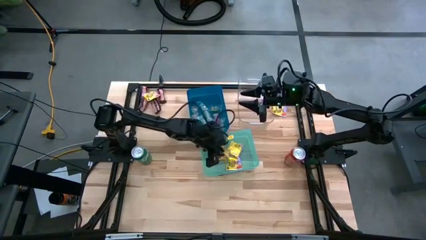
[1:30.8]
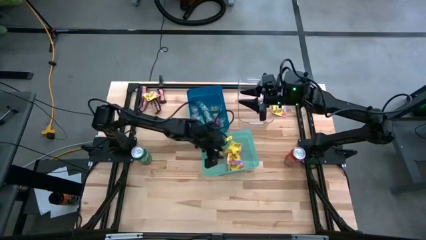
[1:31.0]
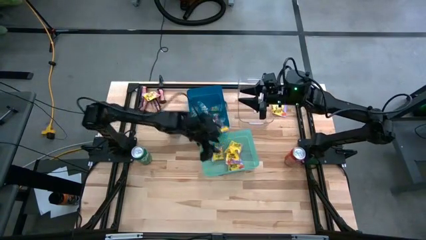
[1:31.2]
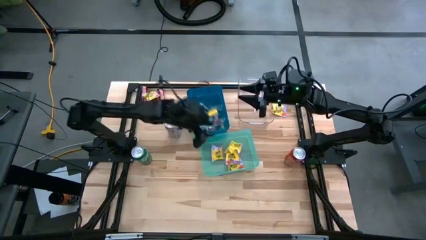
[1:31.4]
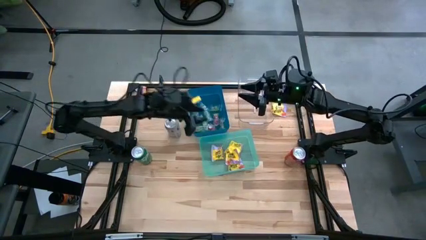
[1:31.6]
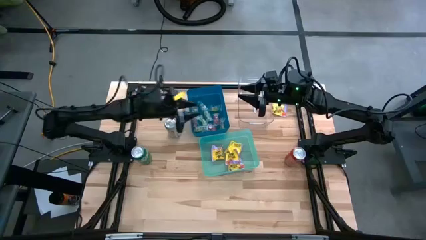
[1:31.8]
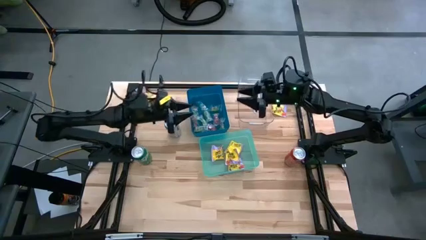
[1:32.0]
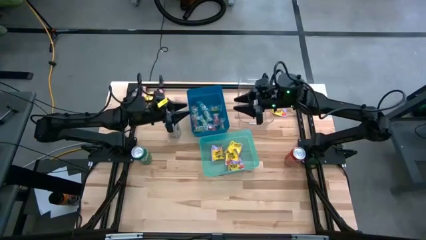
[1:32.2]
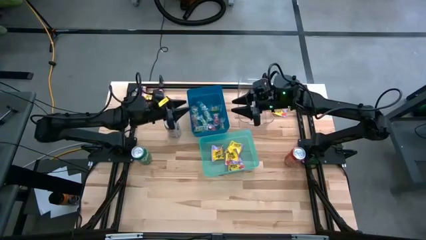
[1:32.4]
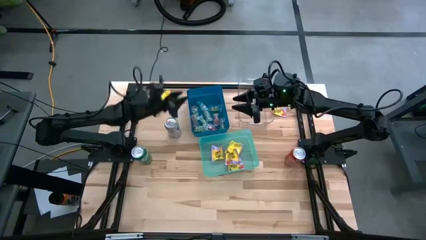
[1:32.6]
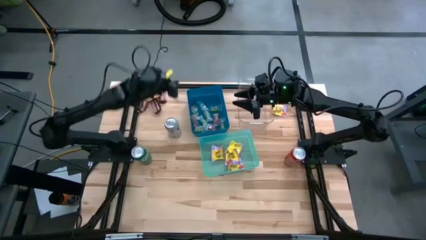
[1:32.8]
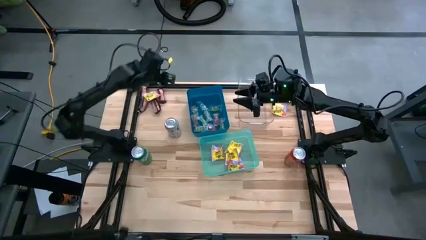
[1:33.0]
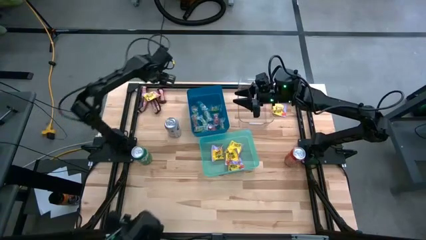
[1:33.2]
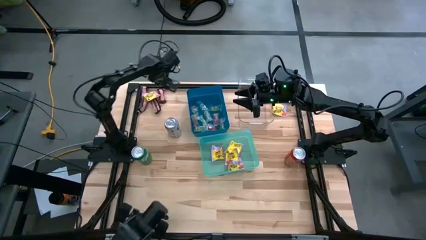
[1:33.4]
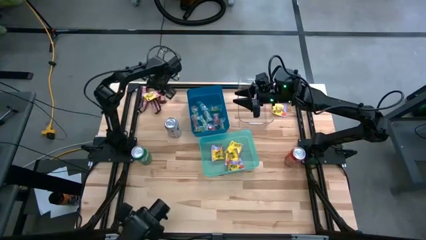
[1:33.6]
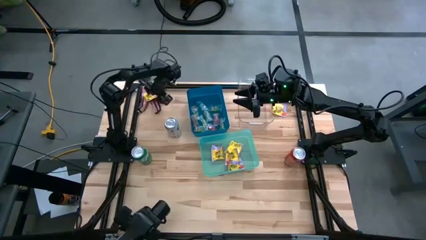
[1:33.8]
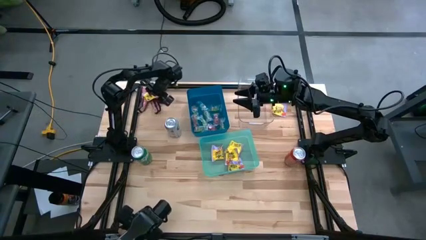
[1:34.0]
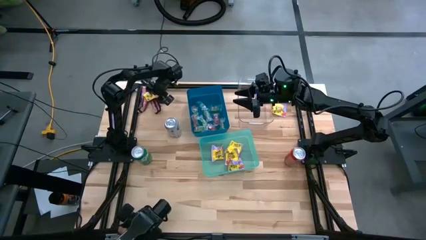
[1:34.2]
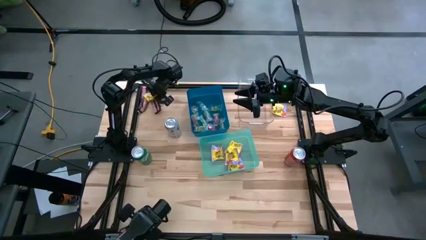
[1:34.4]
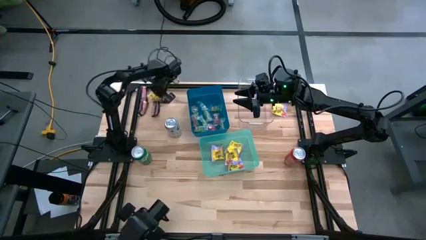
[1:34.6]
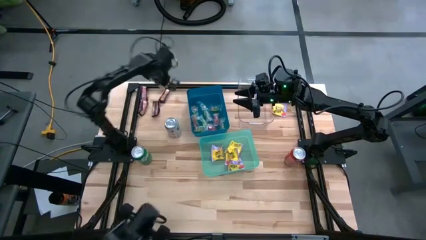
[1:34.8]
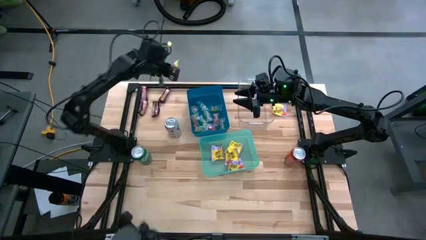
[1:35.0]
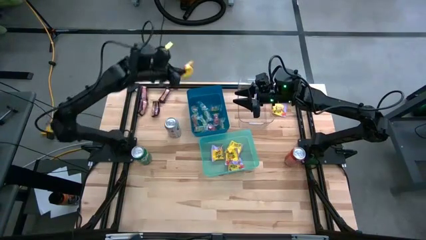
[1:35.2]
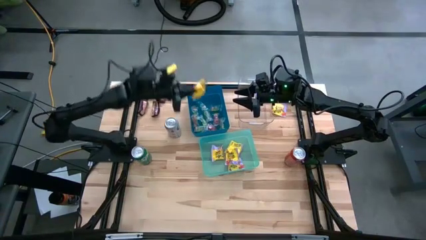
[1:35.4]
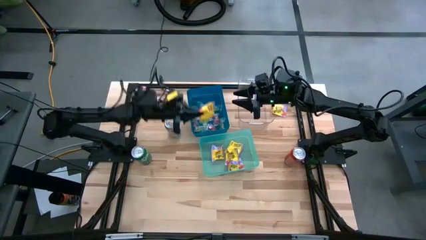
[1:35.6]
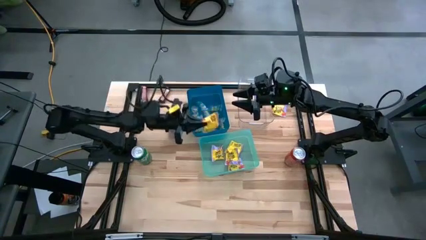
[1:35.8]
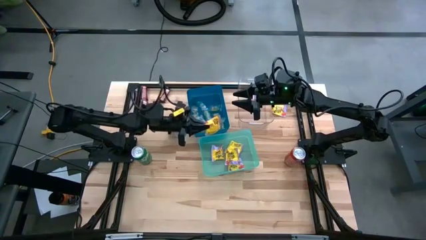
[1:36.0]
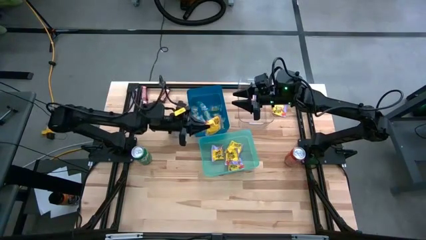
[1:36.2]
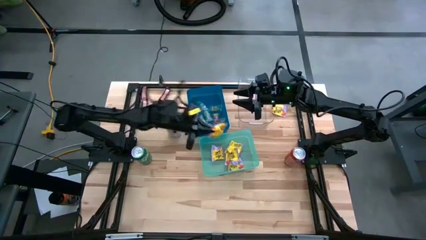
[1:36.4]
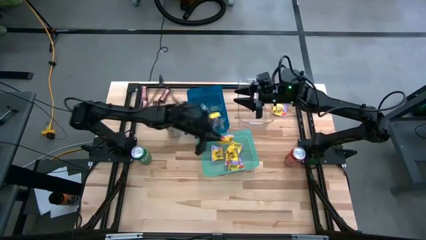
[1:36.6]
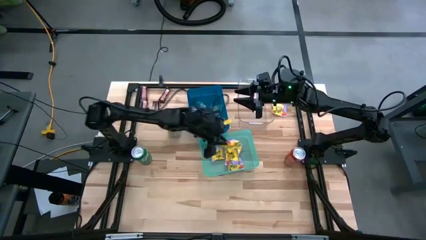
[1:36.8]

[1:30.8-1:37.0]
Task: Sort candy
Put the yellow candy into the green bin

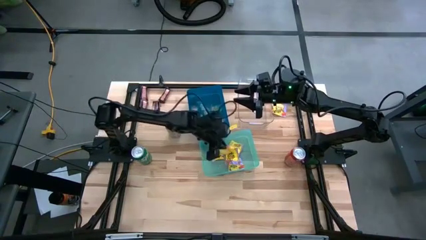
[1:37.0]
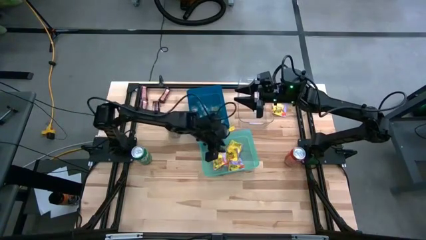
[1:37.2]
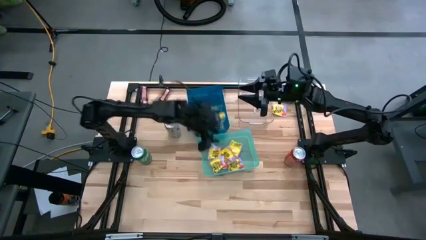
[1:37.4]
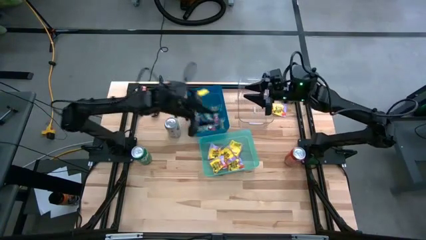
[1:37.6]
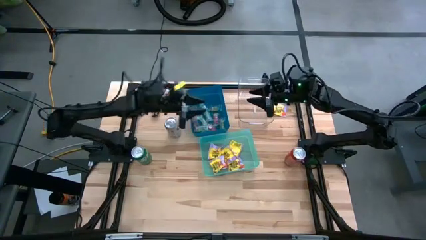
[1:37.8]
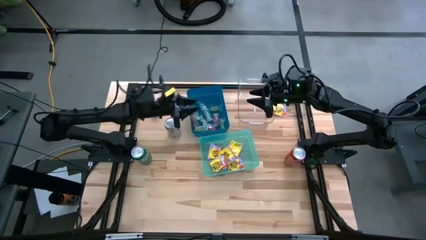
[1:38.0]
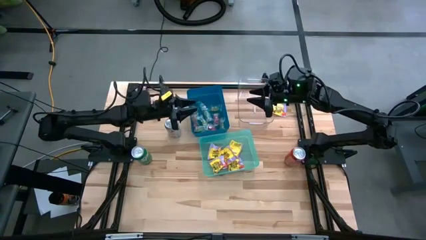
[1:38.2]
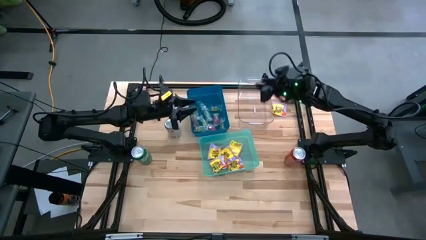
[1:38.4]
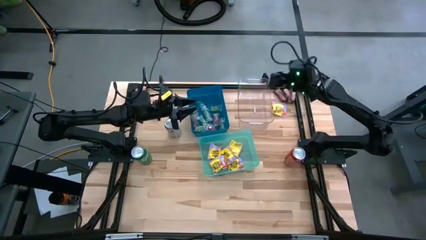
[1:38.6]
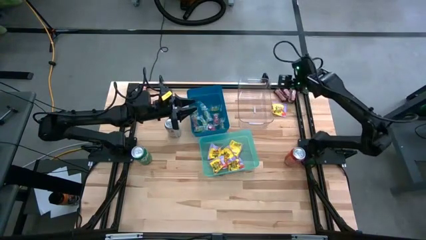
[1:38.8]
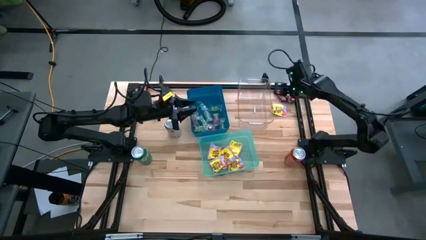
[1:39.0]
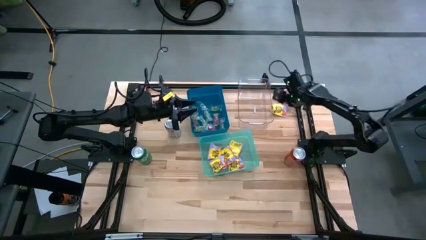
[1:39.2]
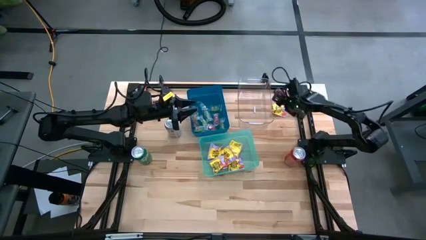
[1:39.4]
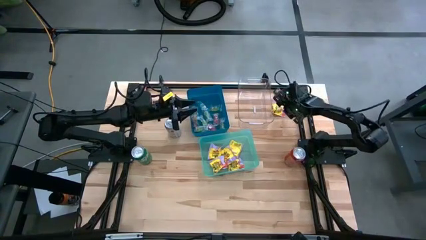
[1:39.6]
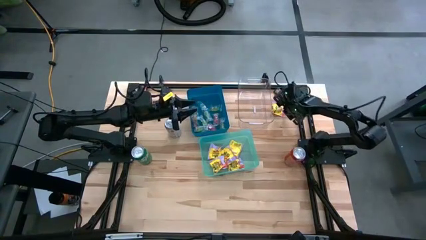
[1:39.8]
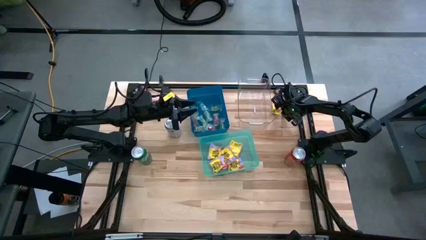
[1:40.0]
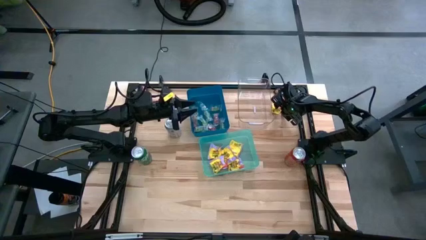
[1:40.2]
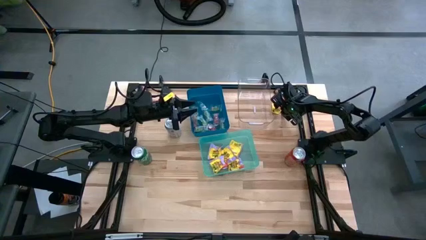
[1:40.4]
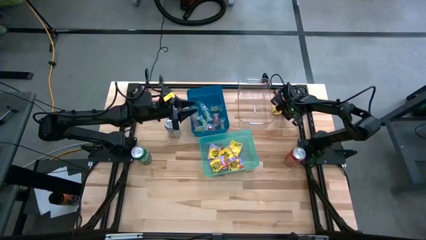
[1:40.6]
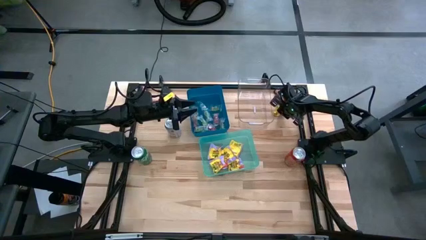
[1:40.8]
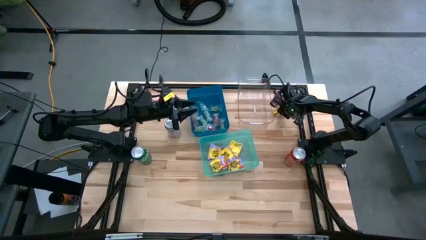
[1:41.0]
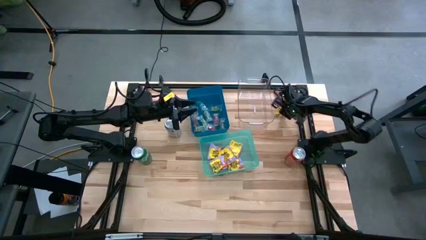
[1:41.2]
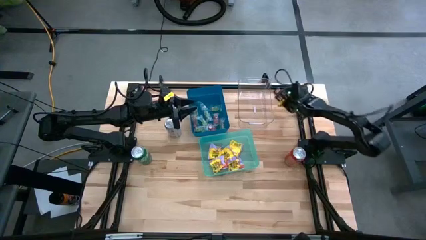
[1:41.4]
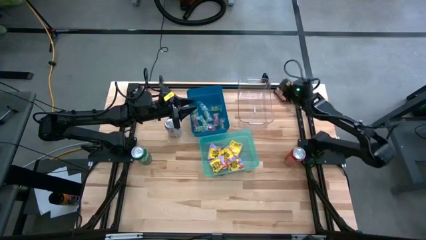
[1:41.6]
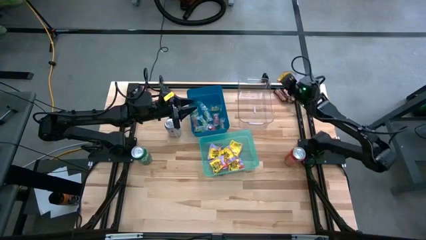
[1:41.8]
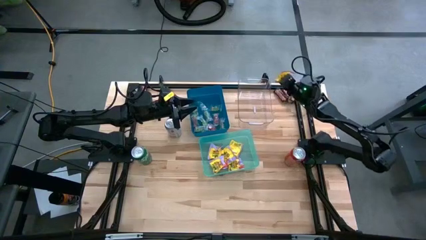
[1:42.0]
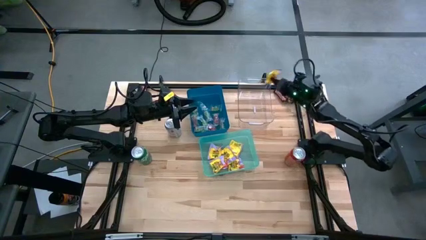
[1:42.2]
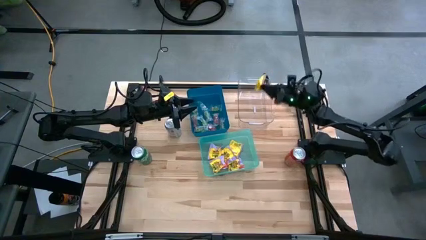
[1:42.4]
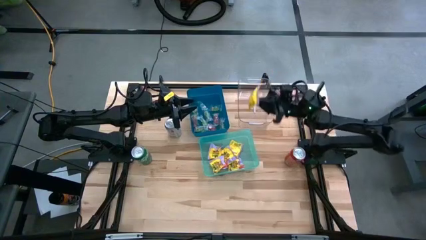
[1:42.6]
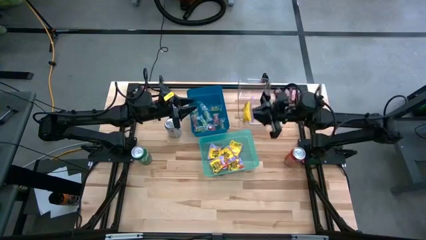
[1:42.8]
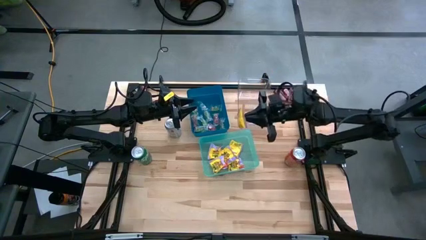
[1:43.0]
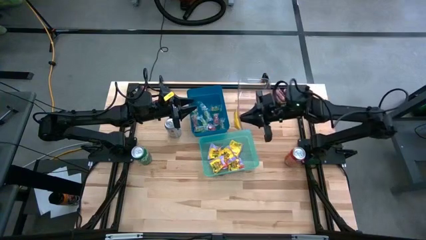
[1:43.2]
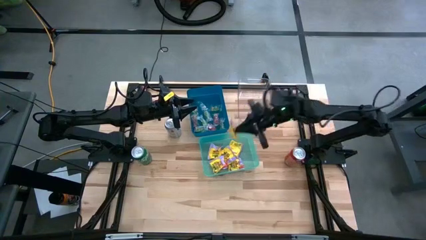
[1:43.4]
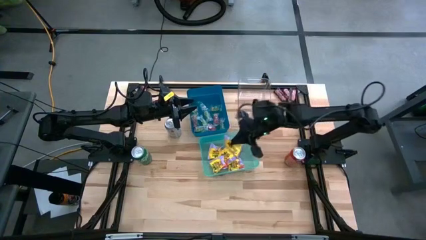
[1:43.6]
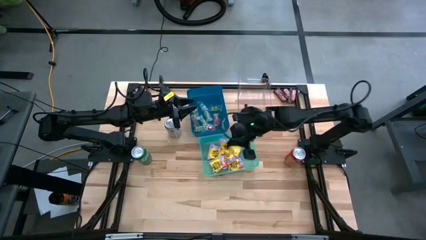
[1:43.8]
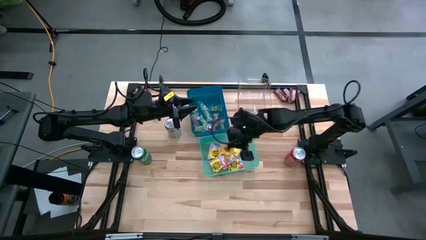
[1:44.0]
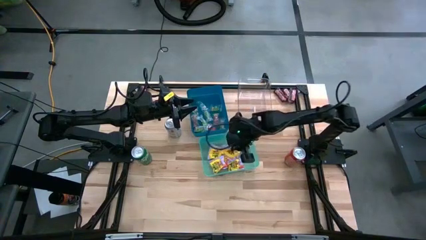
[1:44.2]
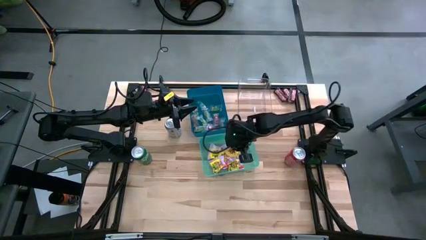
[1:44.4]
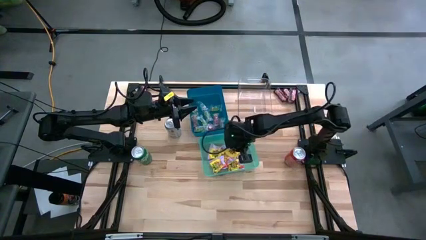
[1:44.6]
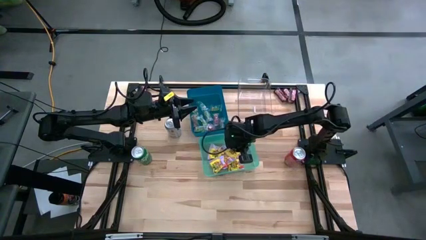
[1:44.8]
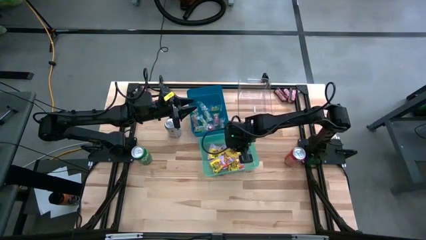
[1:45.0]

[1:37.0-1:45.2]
Put the yellow candy into the green bin

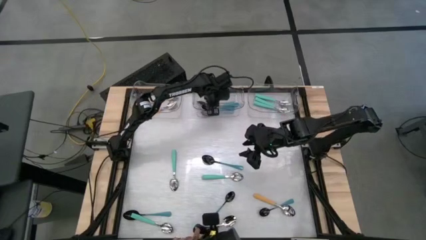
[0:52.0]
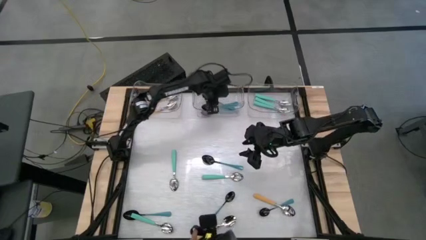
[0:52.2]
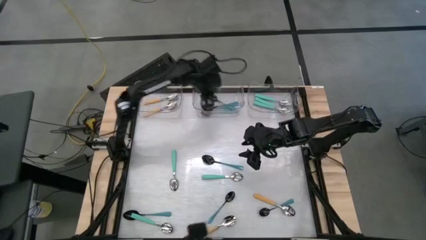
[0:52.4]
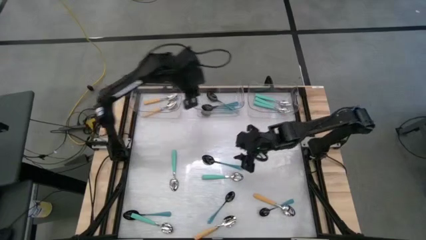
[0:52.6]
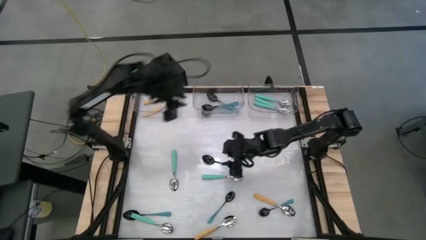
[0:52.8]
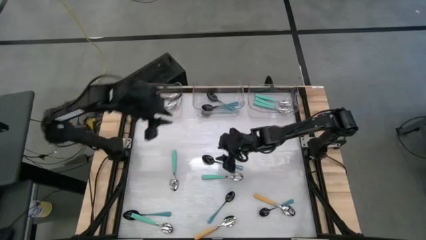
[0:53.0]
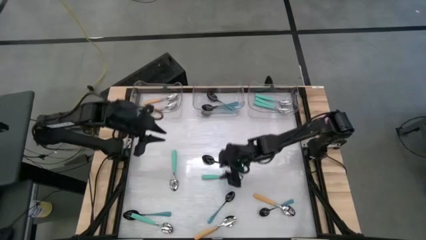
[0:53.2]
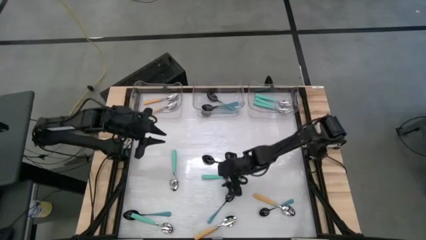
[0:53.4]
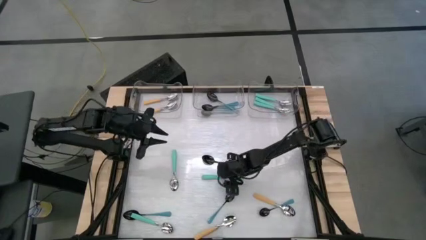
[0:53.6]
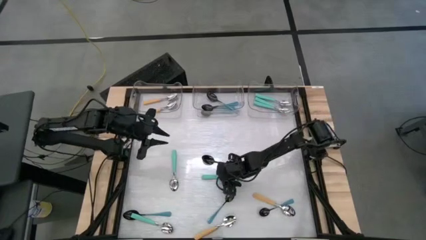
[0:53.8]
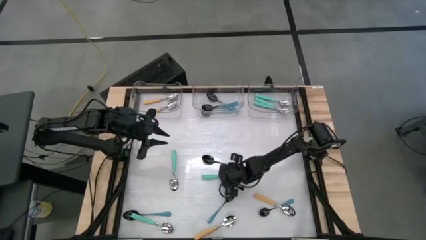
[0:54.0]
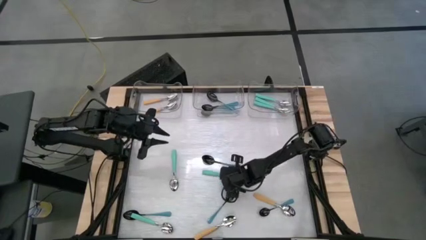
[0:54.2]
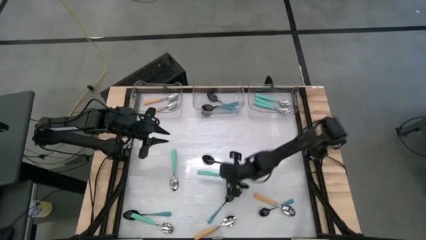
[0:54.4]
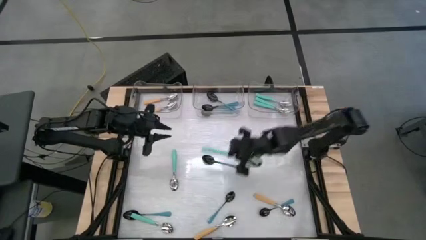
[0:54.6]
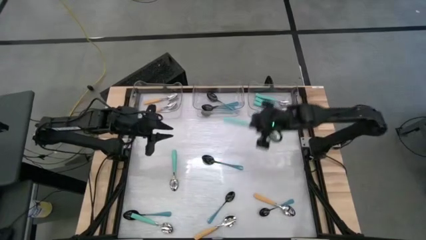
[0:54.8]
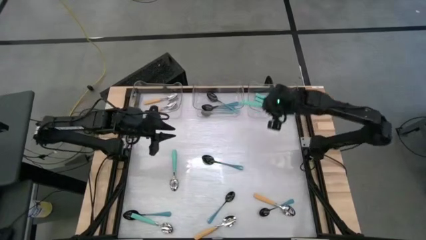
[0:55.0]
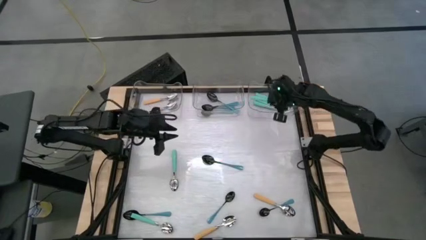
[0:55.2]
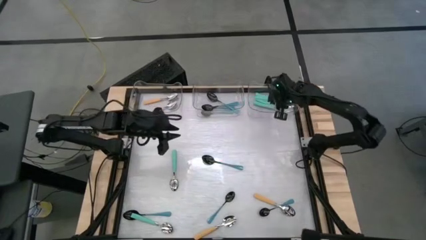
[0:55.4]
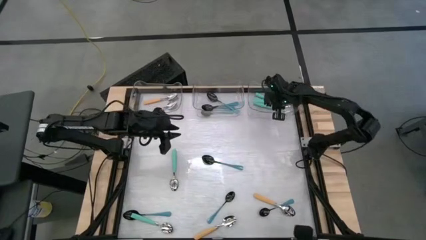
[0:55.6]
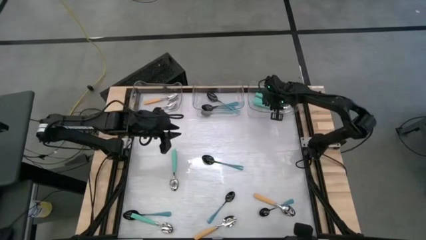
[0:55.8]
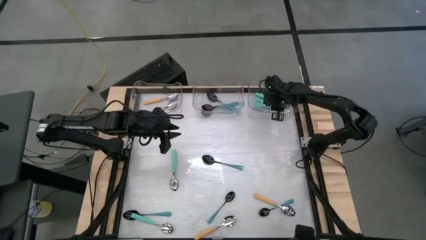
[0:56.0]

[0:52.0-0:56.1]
Task: Sort silverware by color (type)
Put the light green spoon into the right transparent bin
